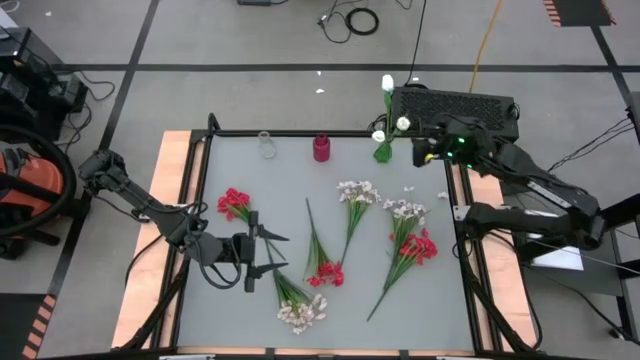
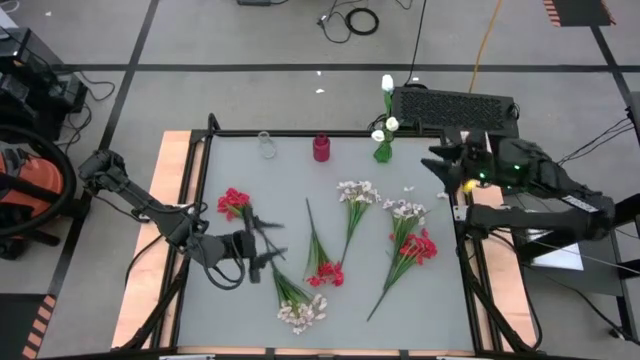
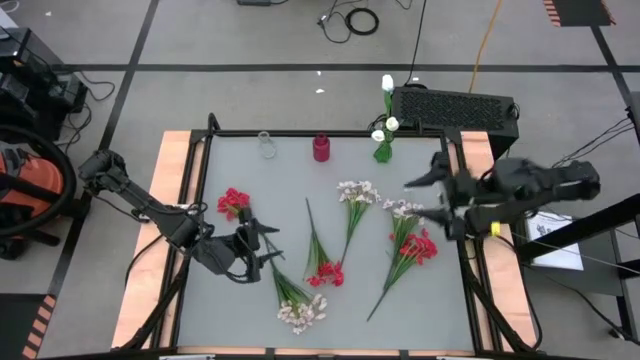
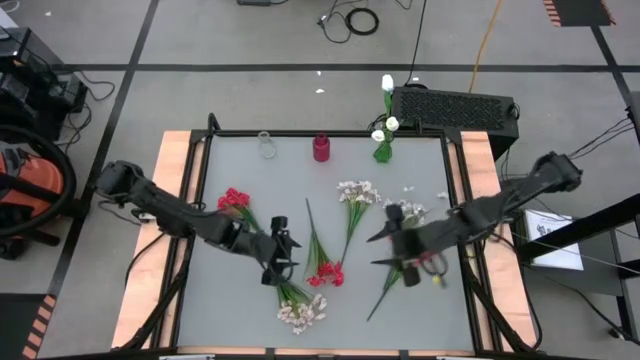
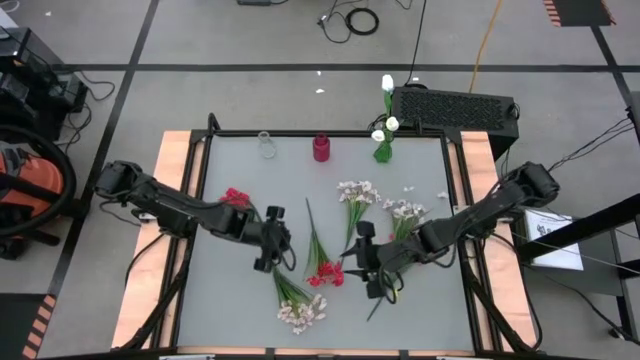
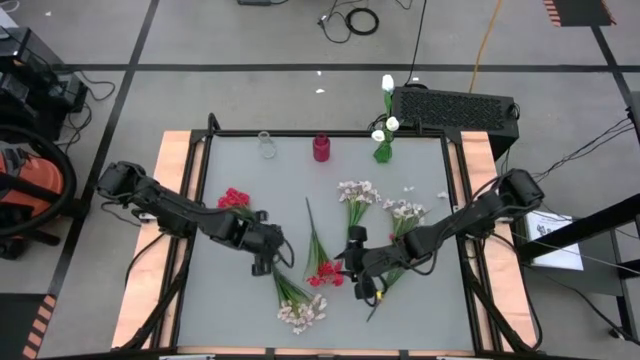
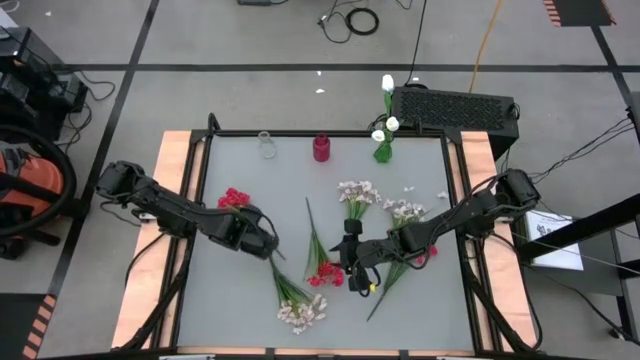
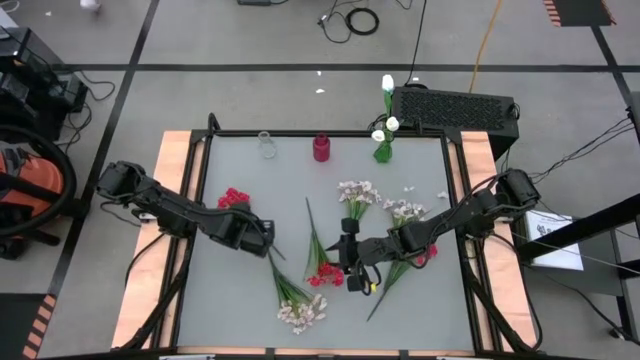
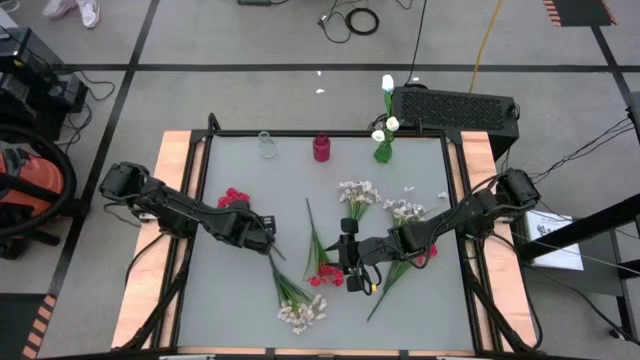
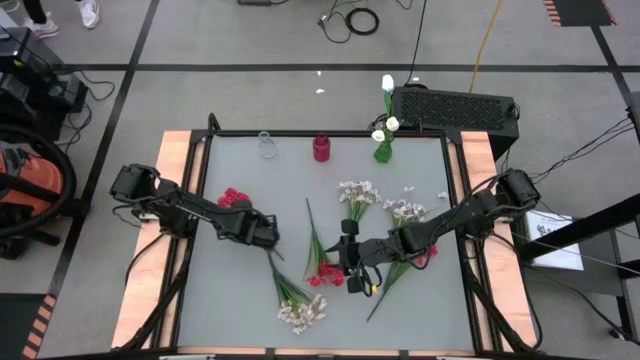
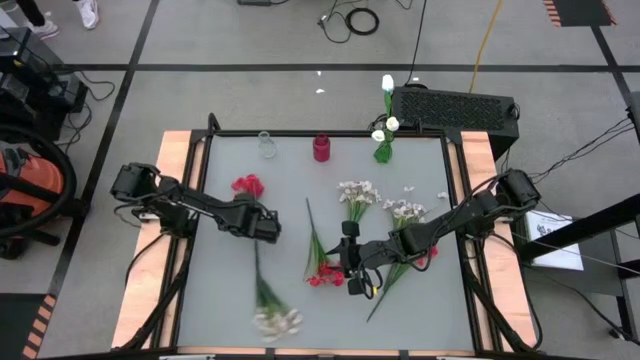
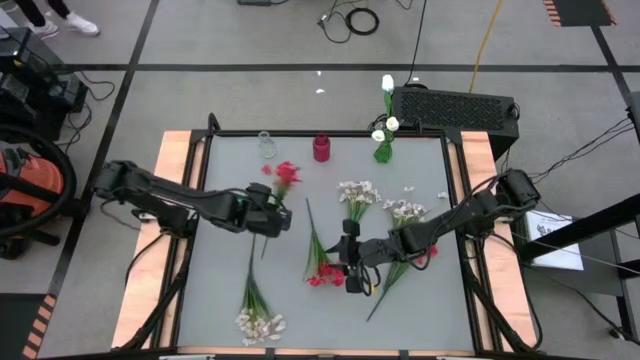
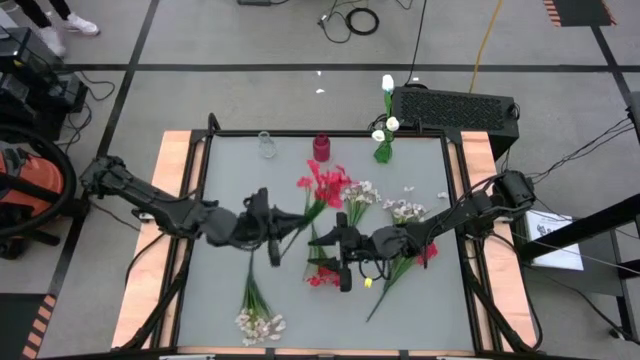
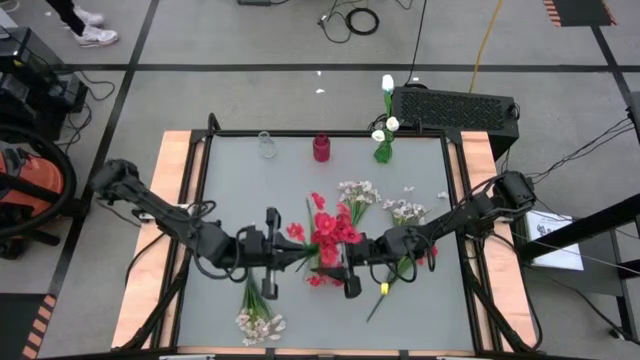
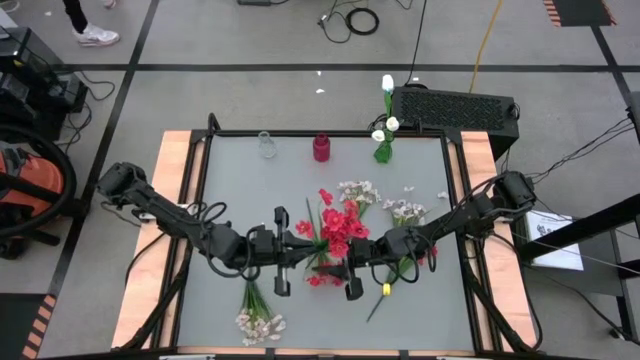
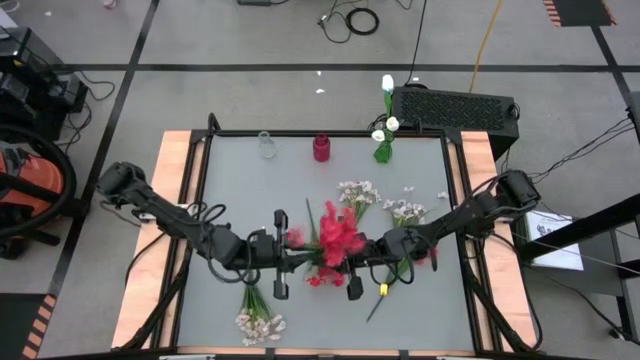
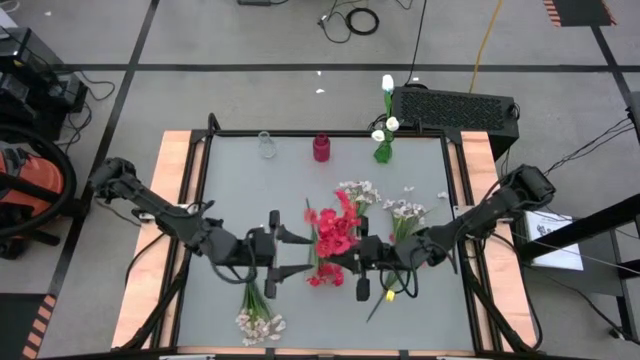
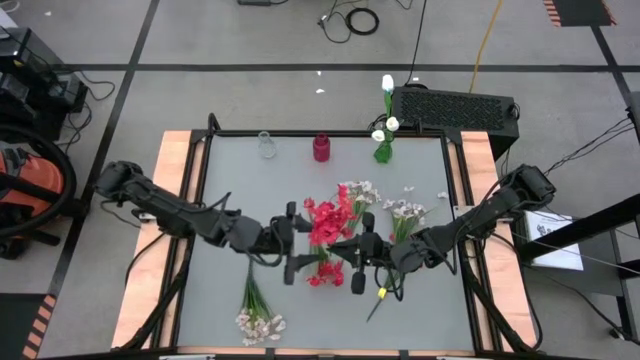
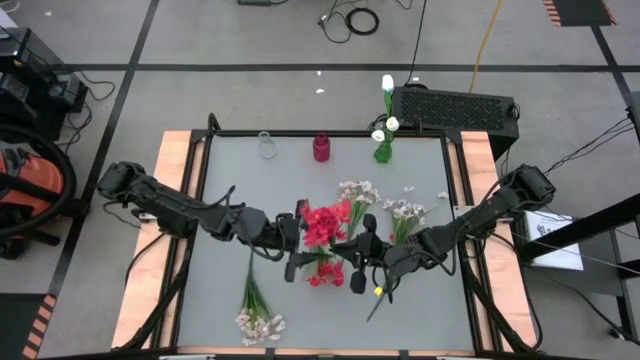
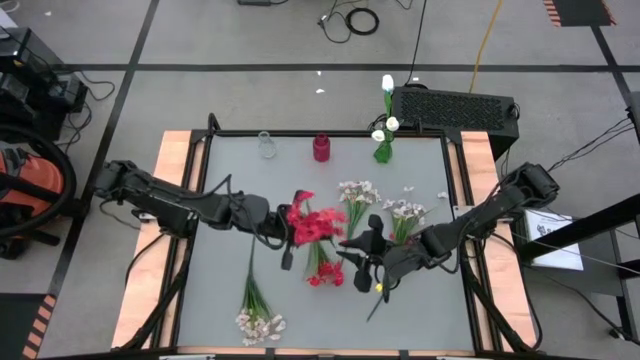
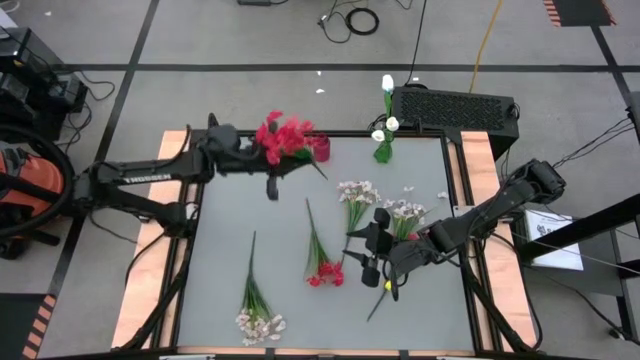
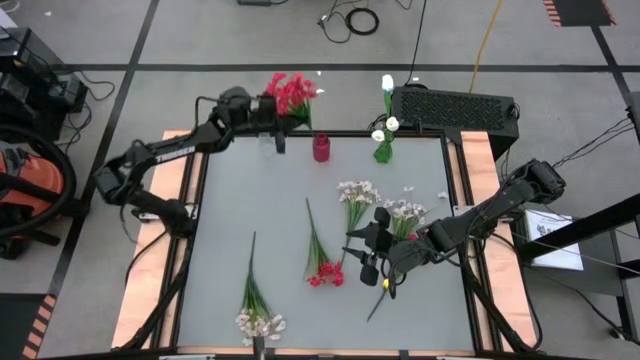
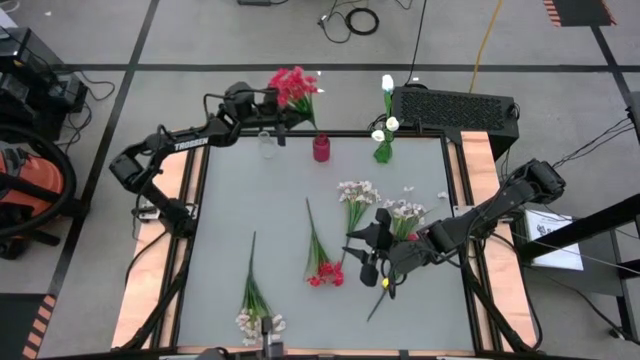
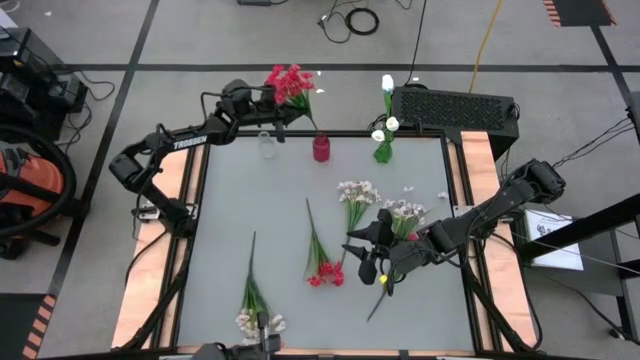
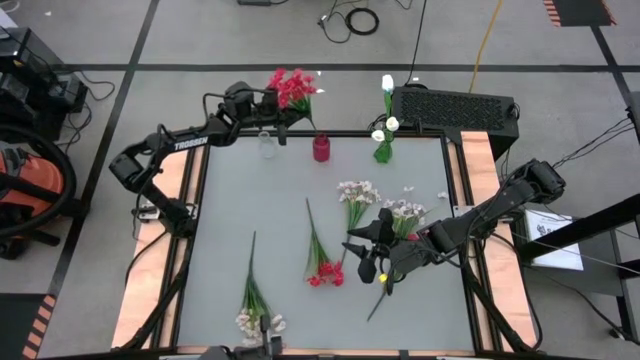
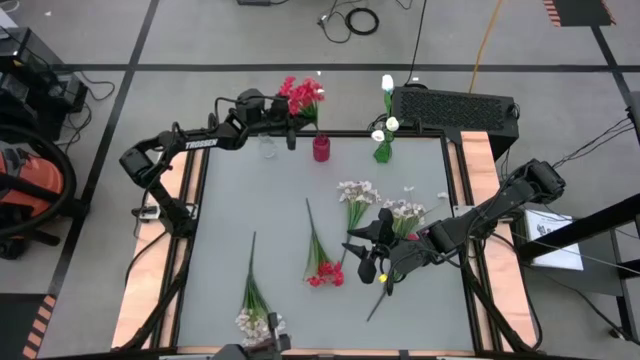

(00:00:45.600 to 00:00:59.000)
Task: Sort flowers into vase by color
Put the left red flowers into the red vase

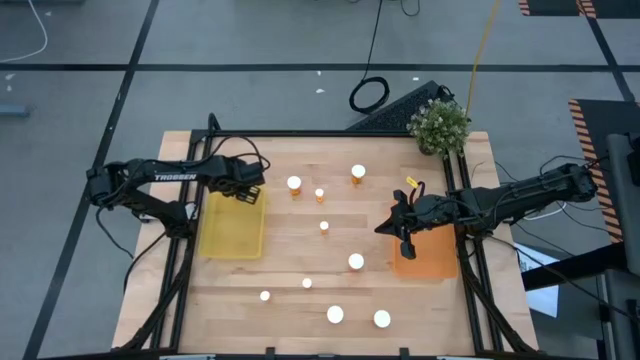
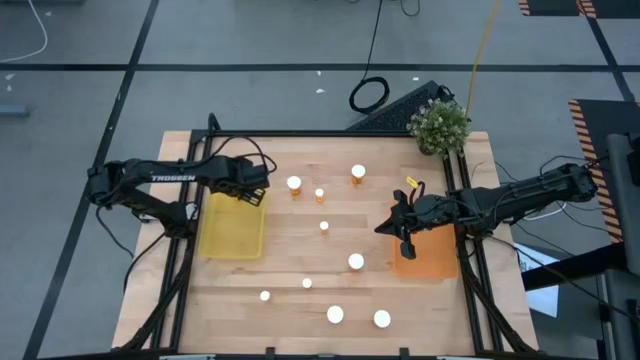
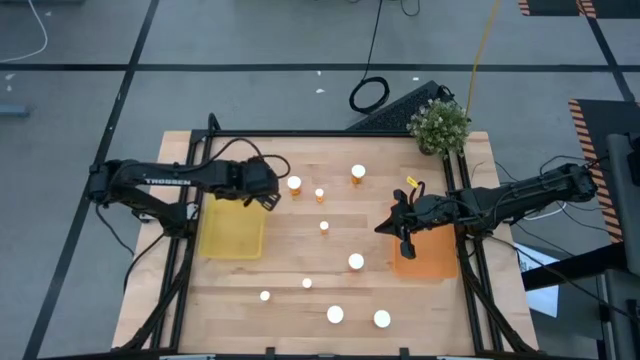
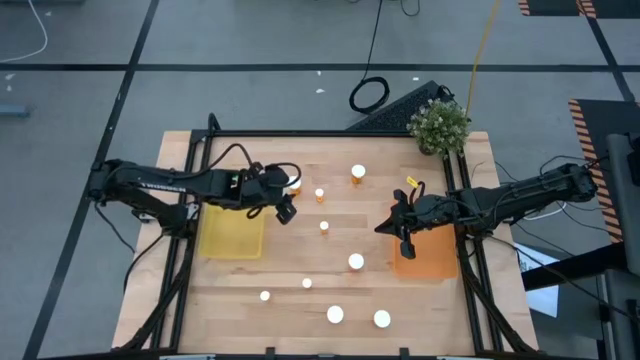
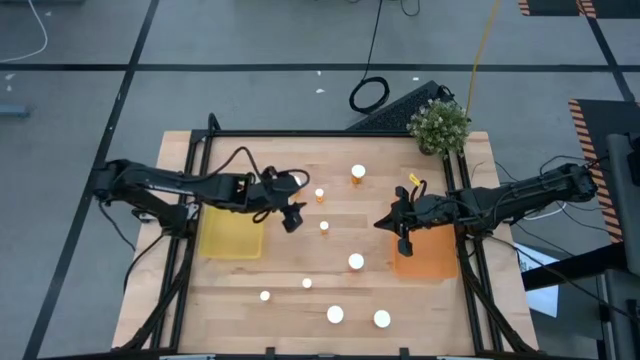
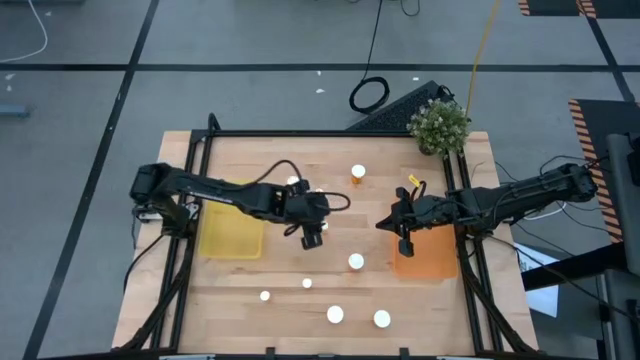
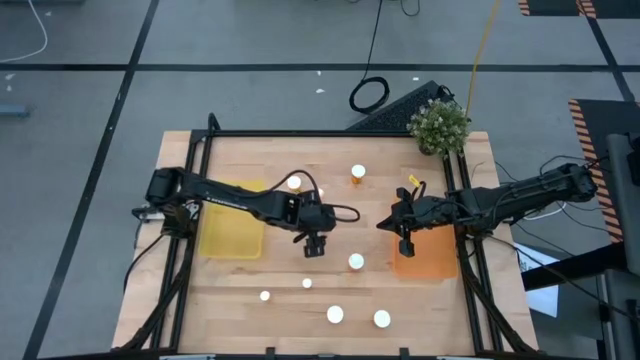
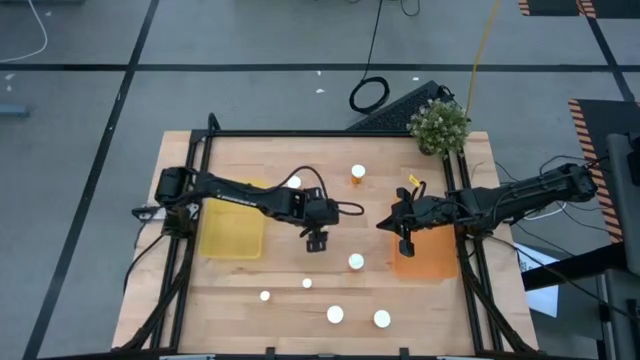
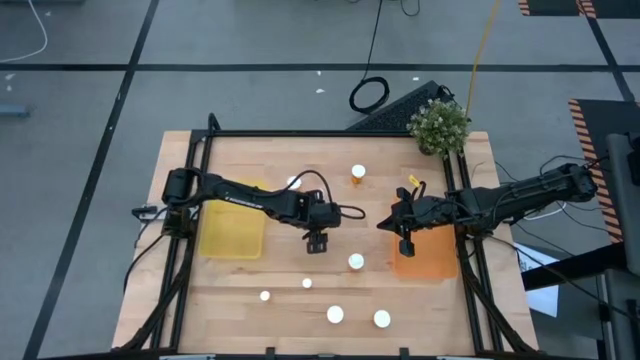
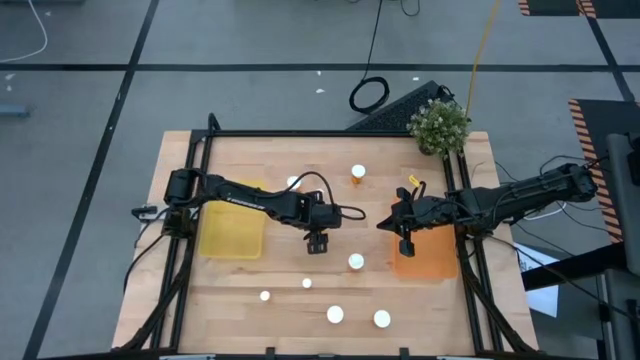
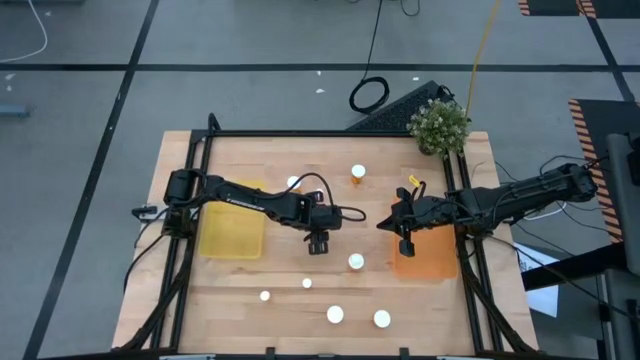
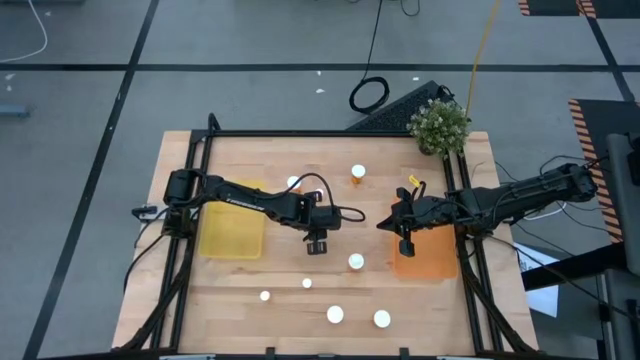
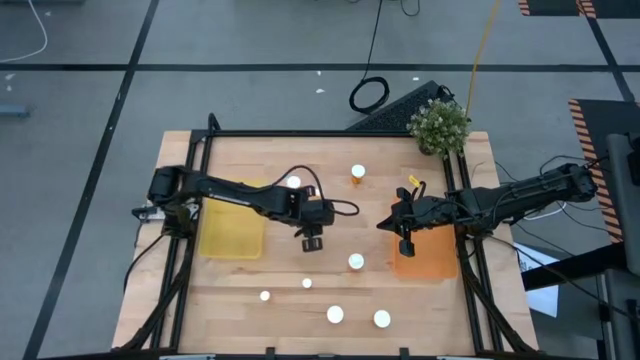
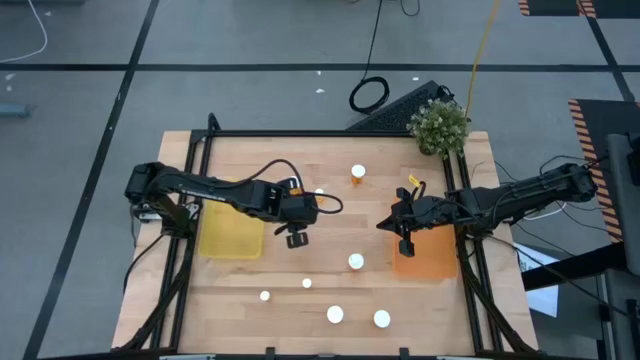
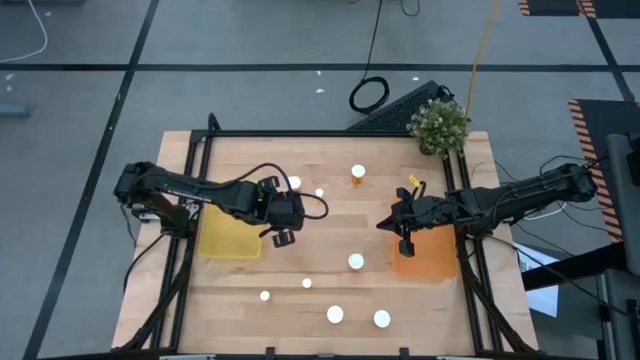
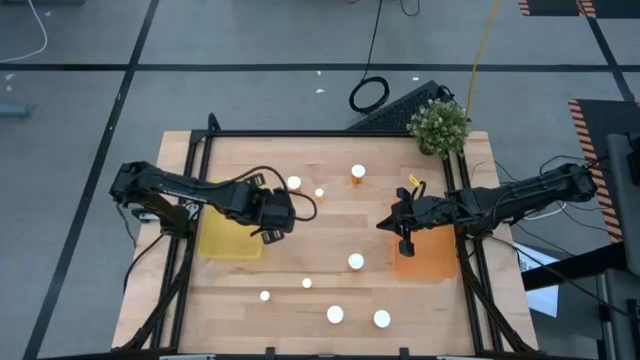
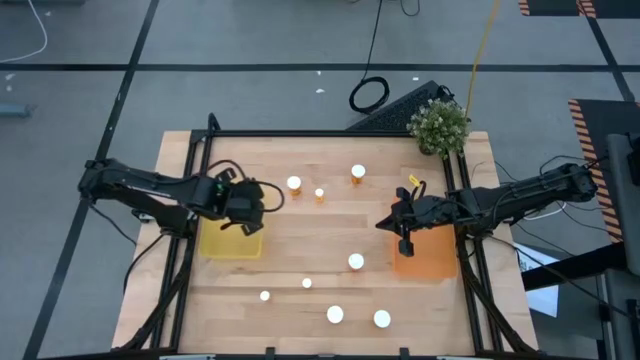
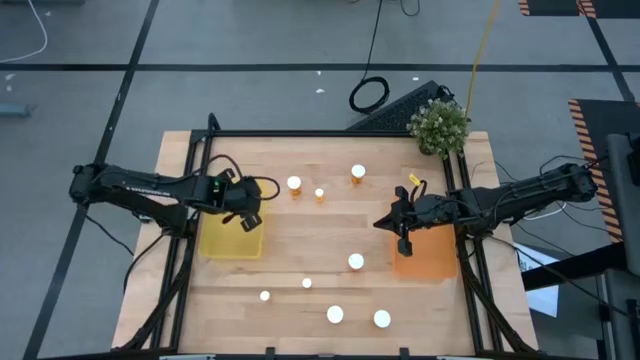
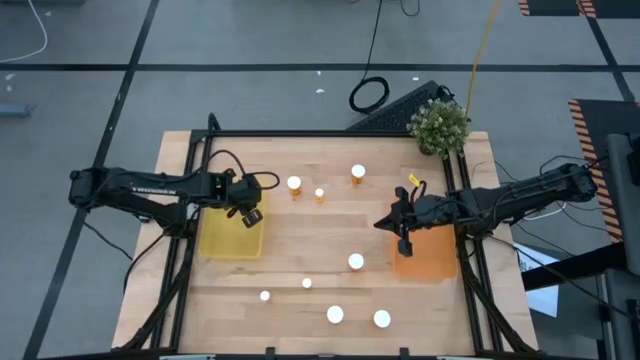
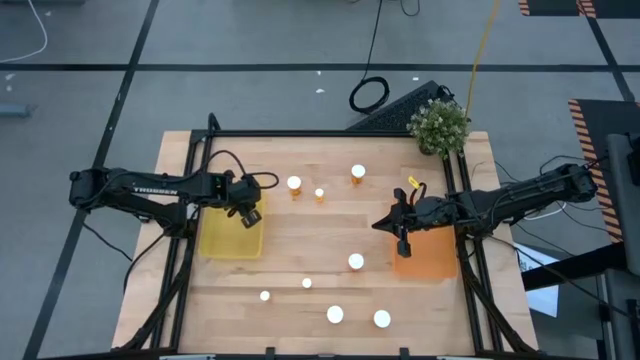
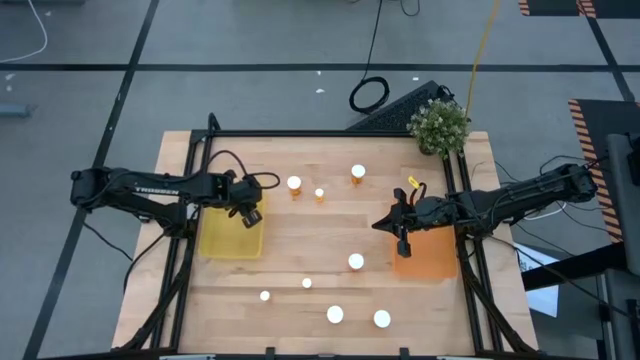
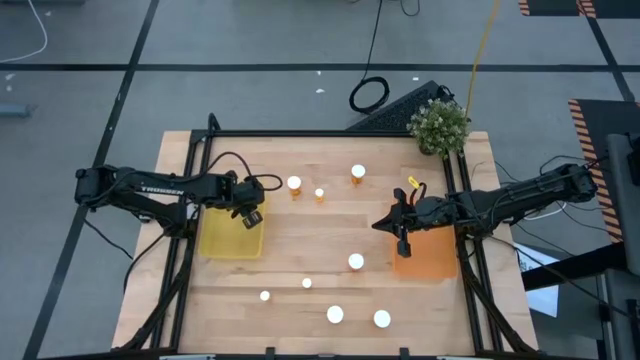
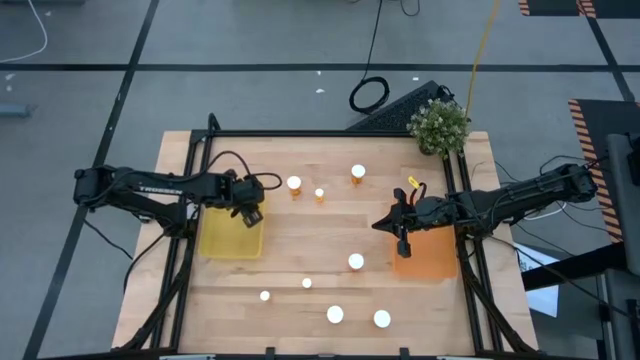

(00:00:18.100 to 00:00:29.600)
Task: Pick and place medicine bottles into bin by pill shape (circle, oval)
Put the small orange pill bottle into the yellow bin
